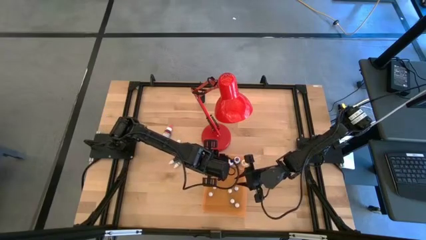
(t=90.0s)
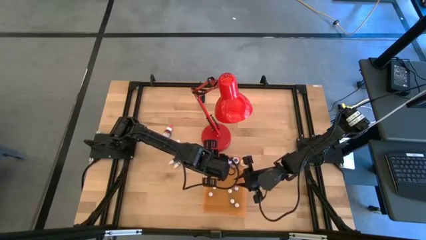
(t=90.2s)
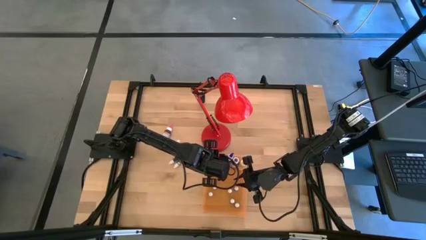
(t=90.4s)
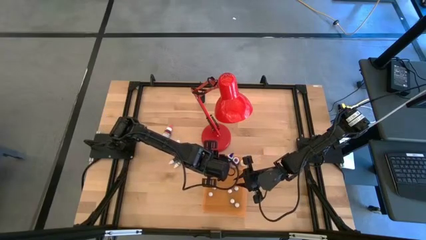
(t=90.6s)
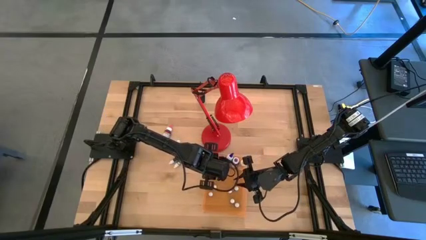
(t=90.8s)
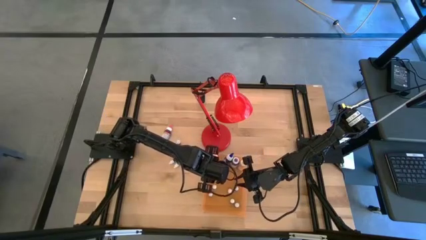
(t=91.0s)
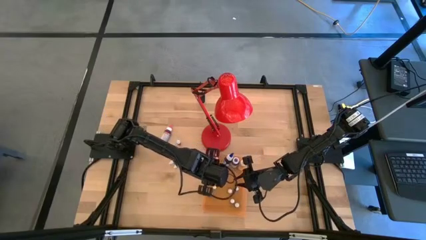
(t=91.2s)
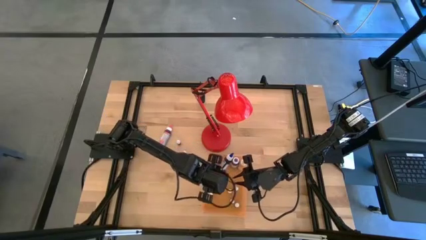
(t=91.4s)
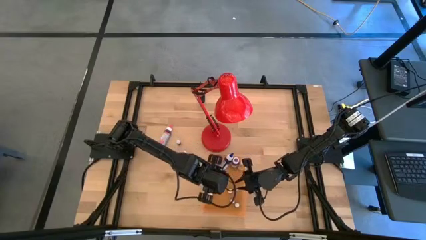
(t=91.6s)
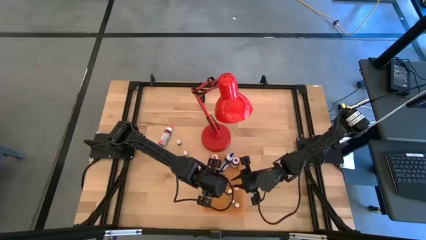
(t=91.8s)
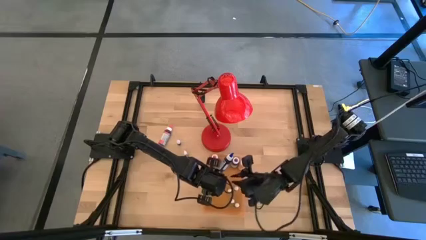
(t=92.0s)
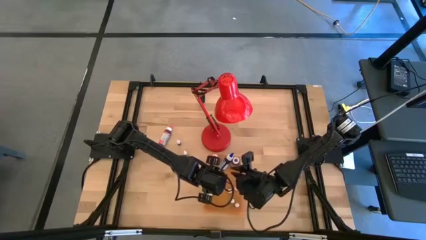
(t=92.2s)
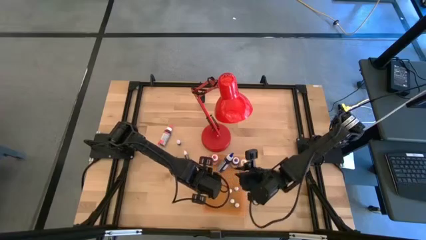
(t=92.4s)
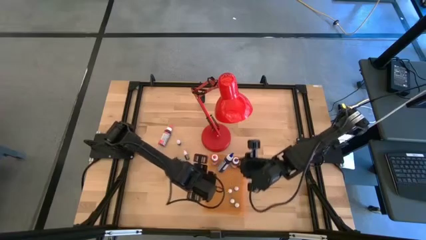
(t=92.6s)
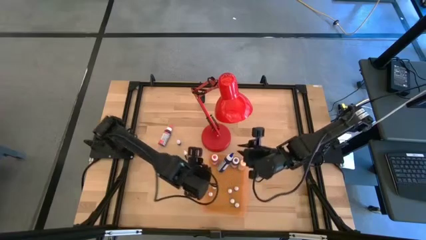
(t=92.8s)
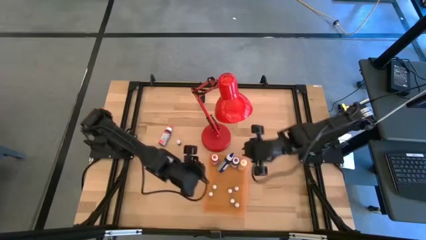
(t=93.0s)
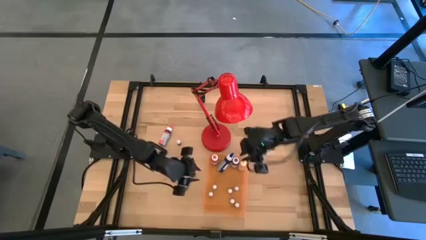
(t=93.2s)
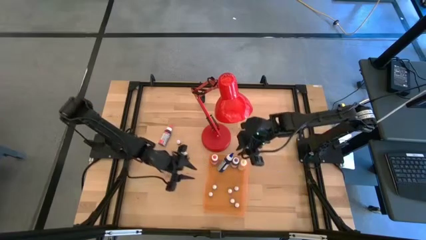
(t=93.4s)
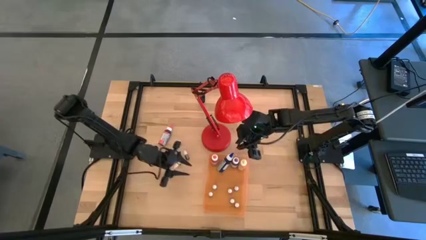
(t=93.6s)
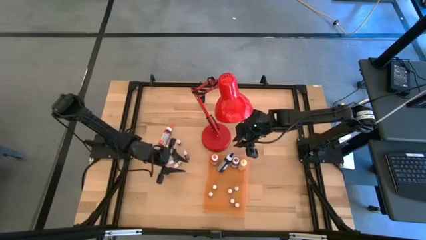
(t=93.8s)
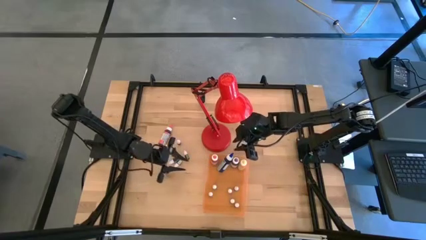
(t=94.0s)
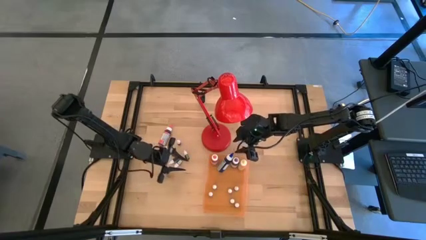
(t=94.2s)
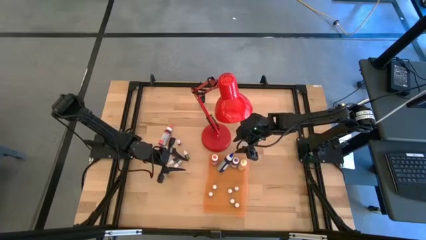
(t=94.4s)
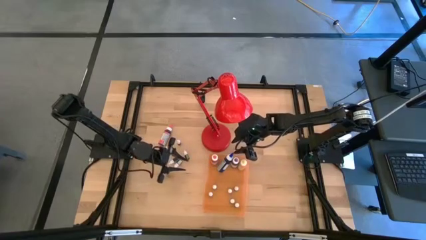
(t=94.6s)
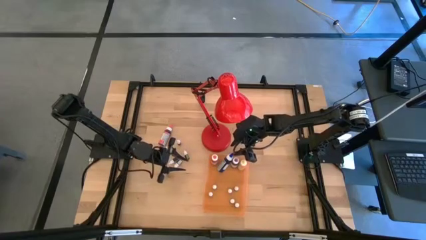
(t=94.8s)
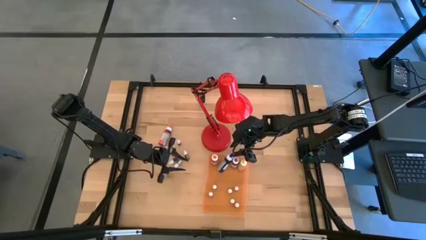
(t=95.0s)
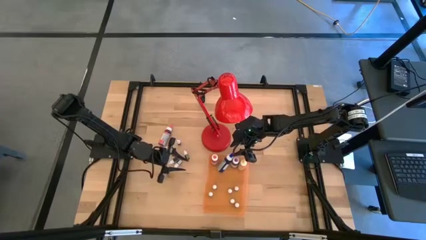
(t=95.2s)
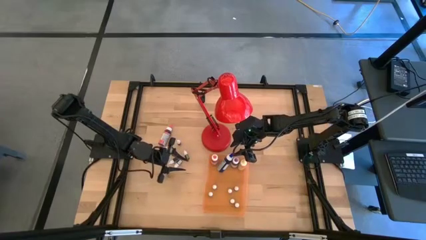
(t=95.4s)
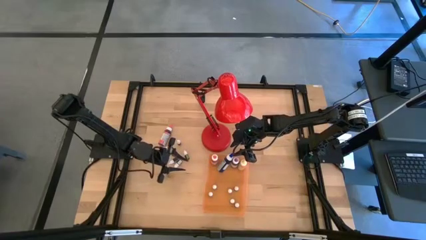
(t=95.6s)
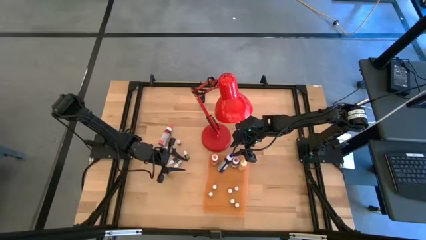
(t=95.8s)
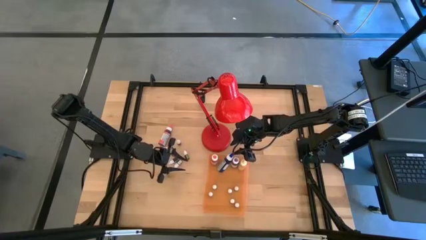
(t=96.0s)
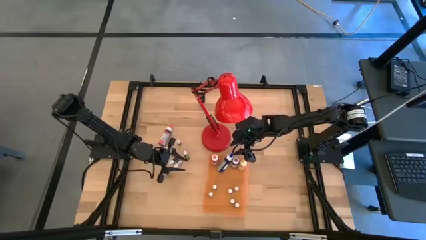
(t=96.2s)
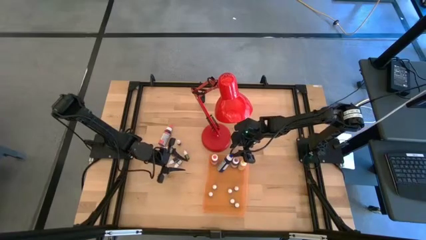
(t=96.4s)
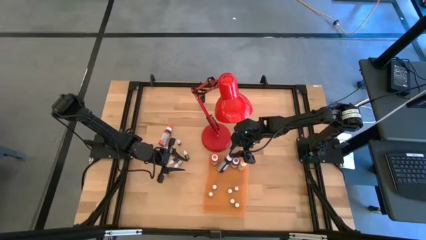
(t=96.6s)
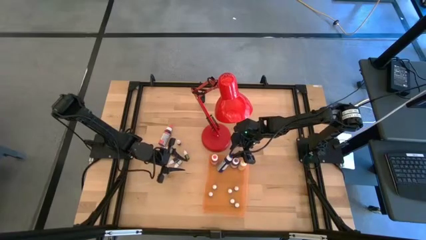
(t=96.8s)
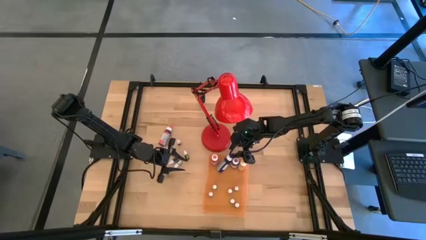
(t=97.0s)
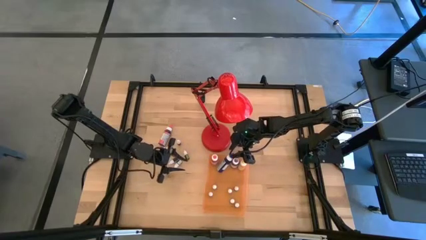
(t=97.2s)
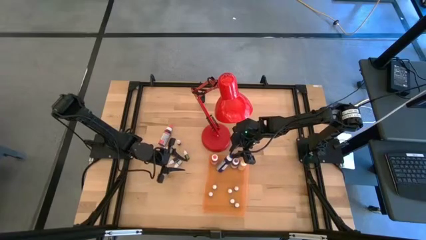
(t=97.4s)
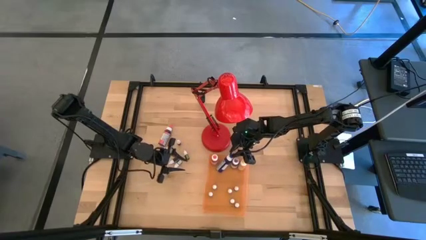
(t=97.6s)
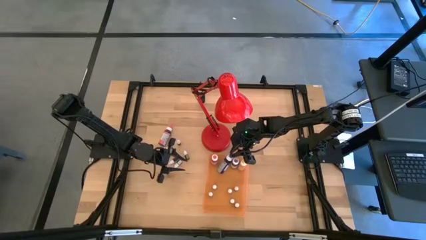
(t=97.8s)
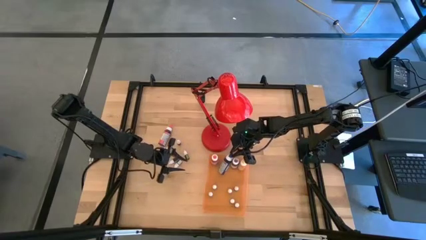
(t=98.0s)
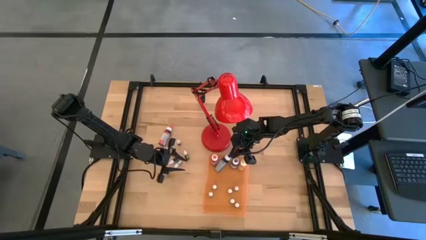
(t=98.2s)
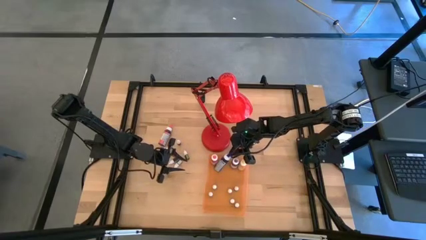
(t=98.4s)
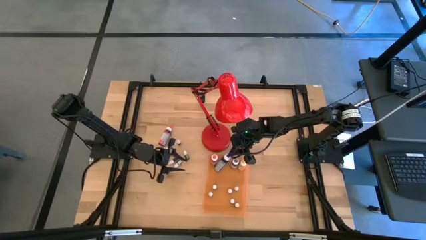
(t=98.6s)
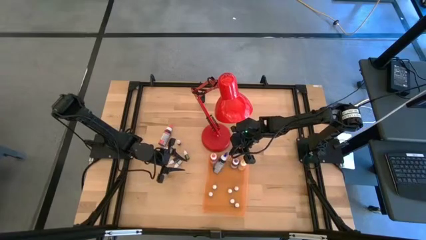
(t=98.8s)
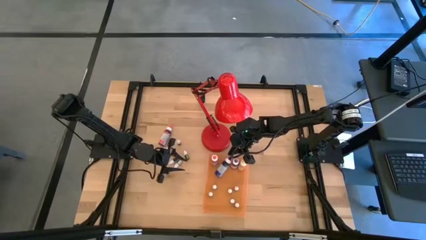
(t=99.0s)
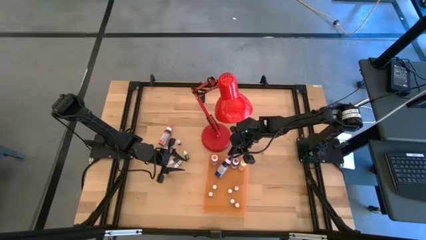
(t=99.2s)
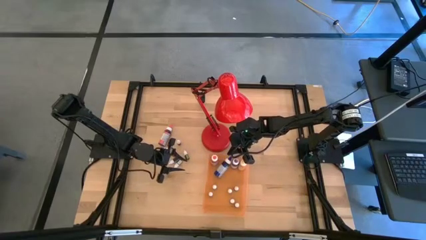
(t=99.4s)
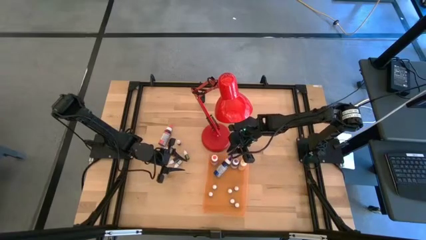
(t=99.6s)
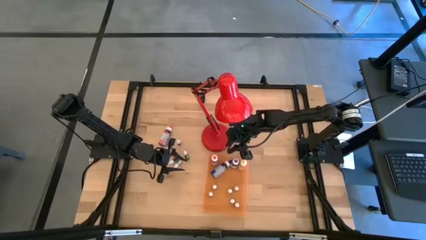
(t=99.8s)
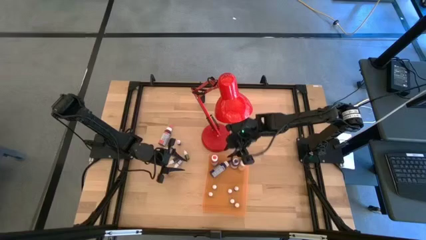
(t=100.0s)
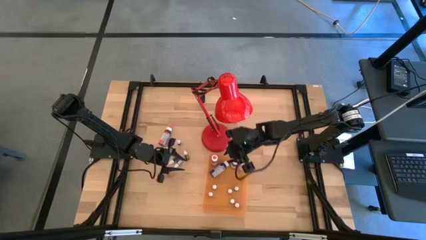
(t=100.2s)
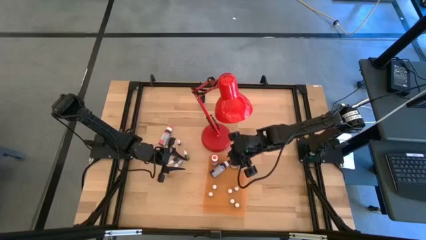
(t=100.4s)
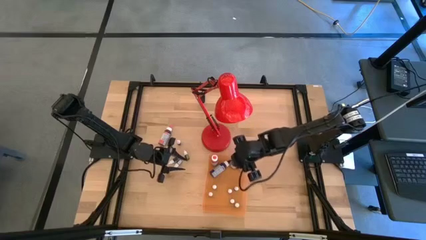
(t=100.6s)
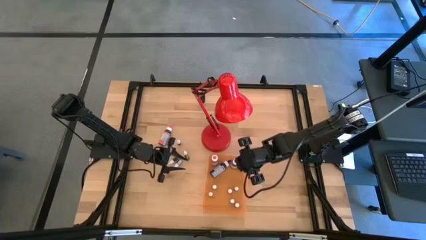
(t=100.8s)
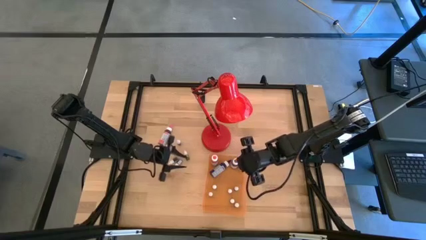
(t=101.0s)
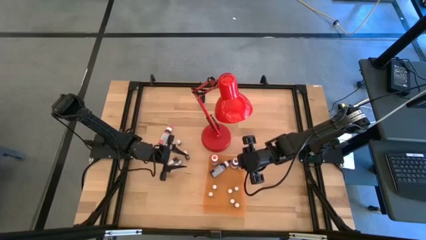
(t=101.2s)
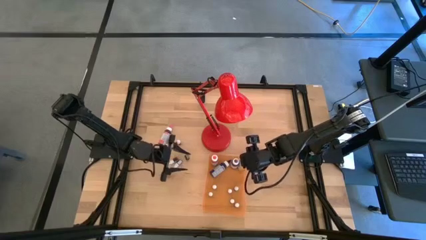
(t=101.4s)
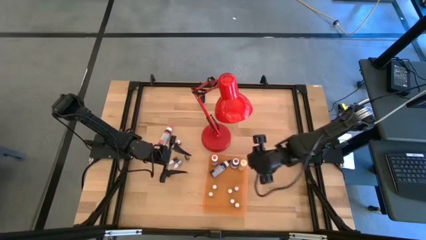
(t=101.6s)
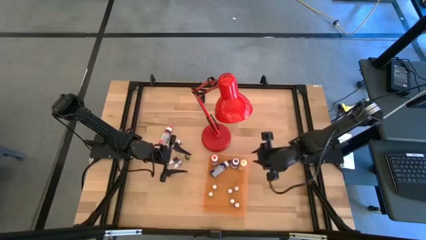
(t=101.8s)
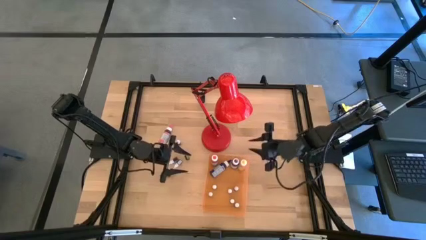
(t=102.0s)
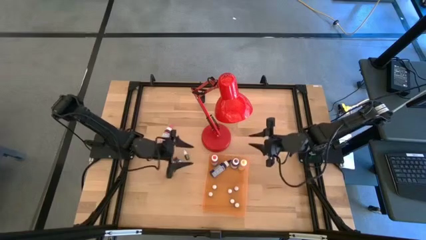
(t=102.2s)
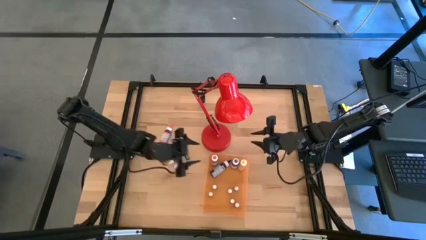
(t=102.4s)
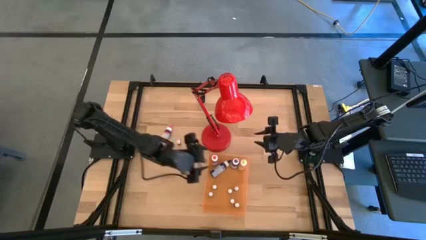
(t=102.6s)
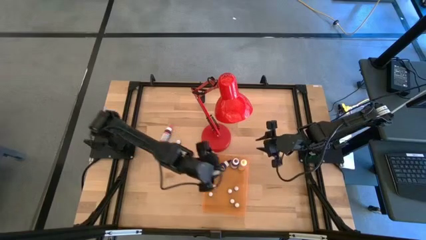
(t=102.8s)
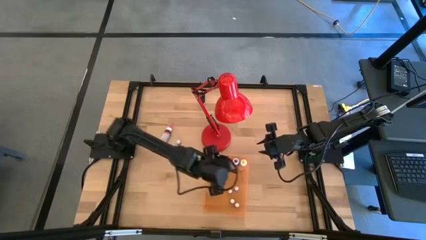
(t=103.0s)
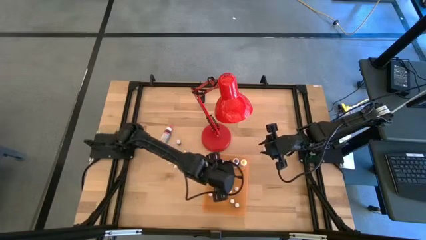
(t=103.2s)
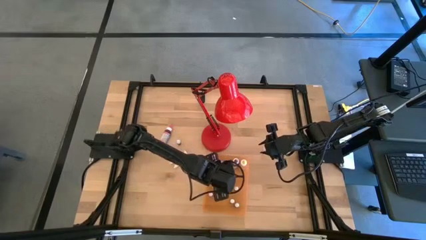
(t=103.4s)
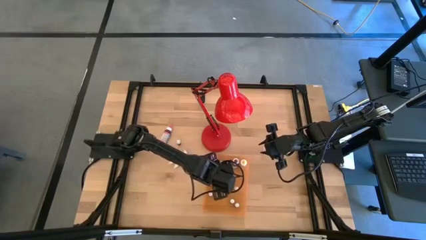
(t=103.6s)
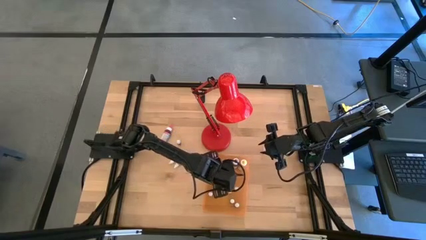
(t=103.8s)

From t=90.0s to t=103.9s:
Task: Pick & Place food coloring
Adjust the large blue food coloring bottle in the orange bin

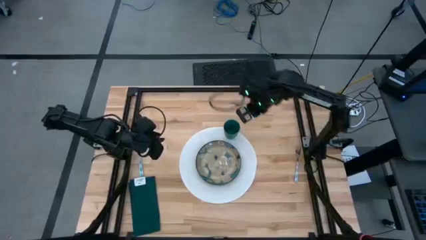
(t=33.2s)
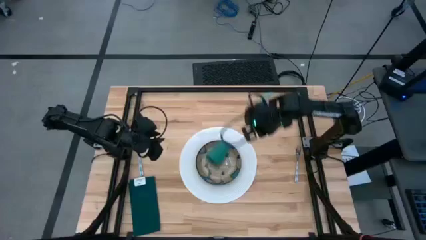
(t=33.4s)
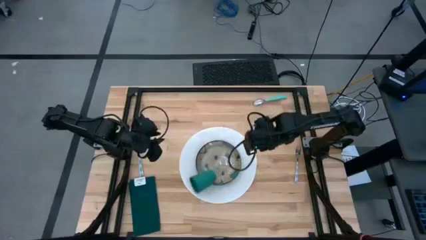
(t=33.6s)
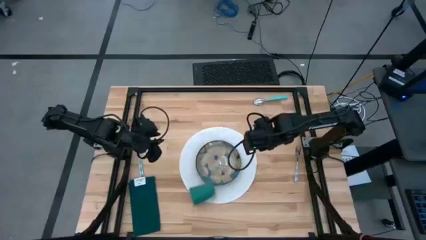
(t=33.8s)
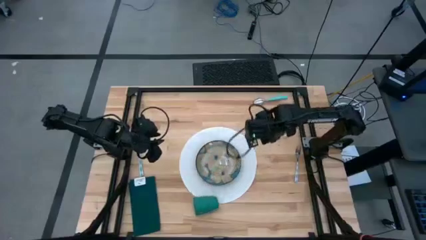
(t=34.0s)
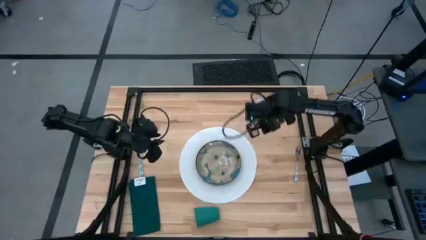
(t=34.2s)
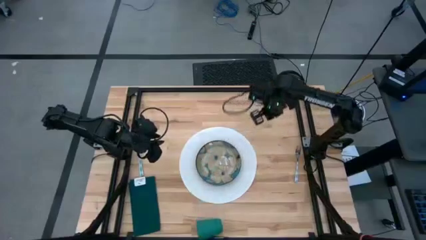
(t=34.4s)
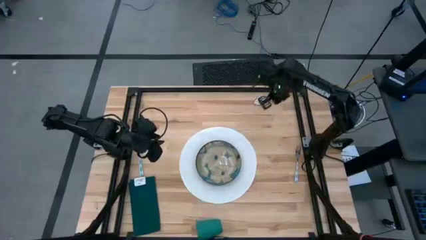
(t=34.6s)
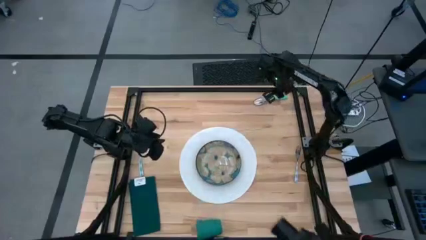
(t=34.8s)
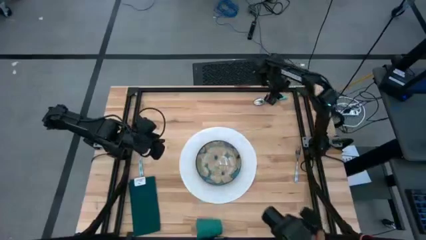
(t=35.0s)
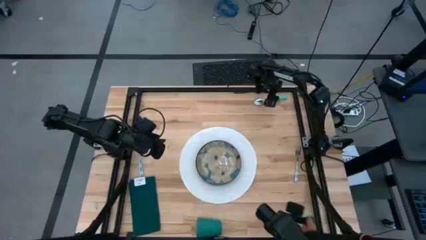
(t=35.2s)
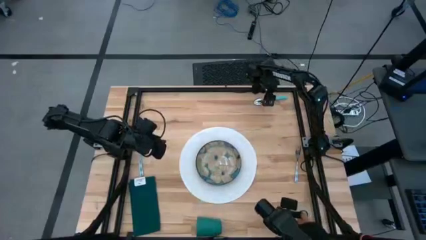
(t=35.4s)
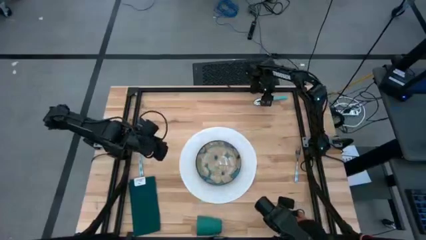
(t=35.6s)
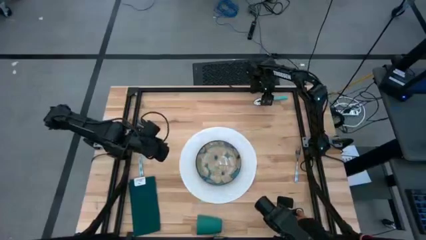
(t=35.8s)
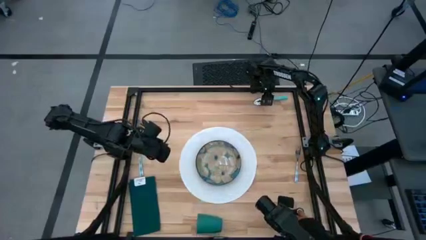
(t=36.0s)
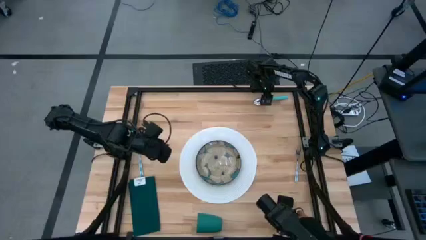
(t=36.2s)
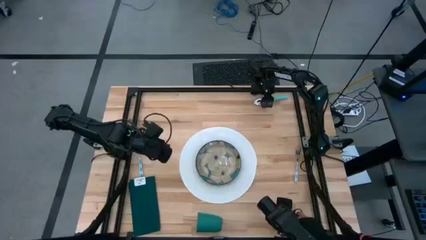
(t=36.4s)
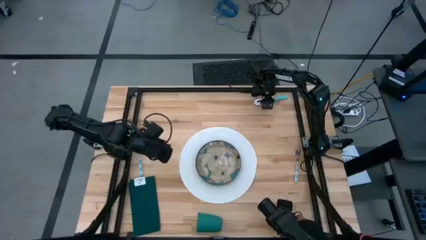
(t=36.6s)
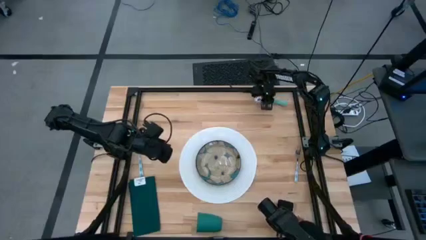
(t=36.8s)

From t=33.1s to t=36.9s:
Task: Set table place
Put the blue spoon on the right side of the white table mat
